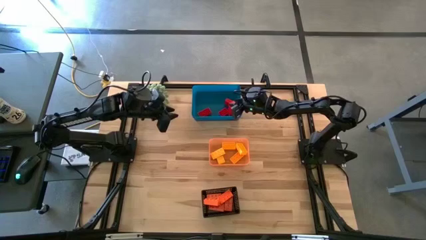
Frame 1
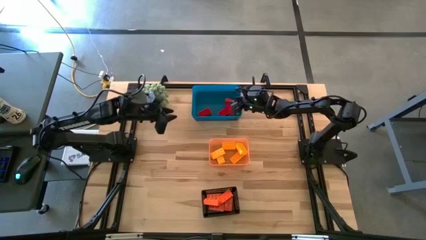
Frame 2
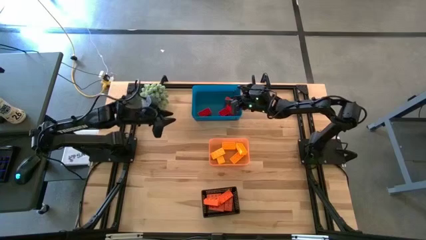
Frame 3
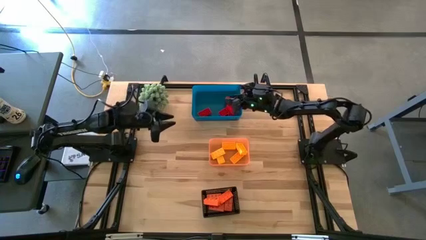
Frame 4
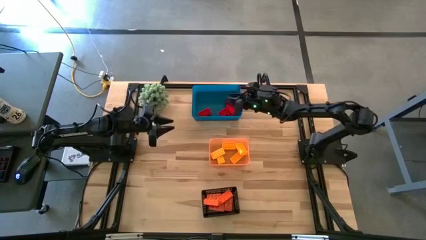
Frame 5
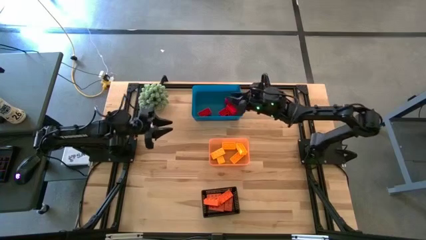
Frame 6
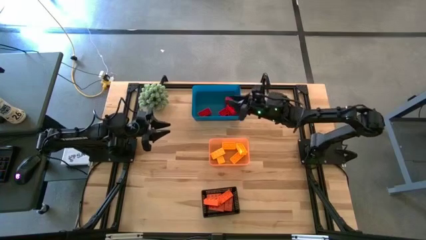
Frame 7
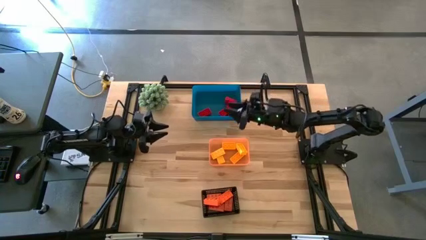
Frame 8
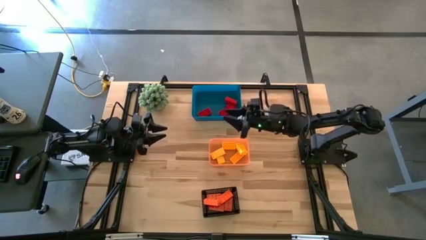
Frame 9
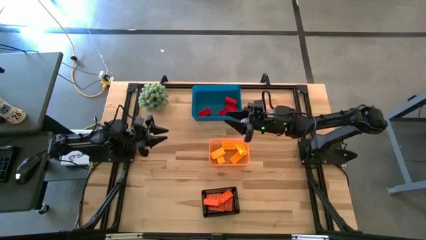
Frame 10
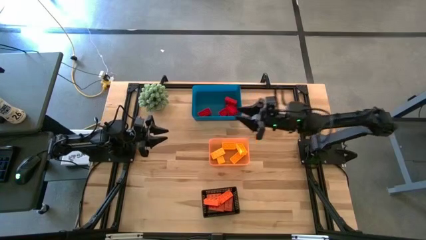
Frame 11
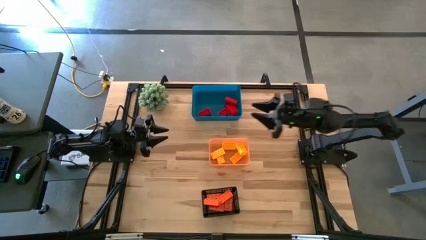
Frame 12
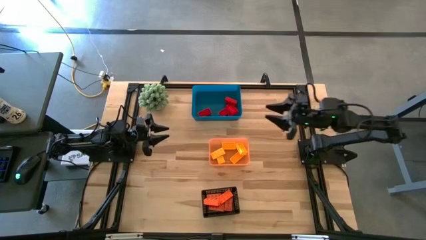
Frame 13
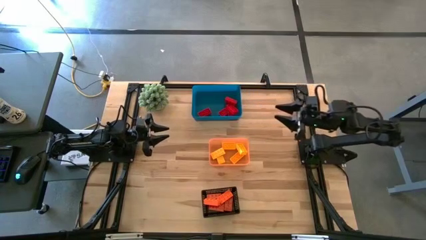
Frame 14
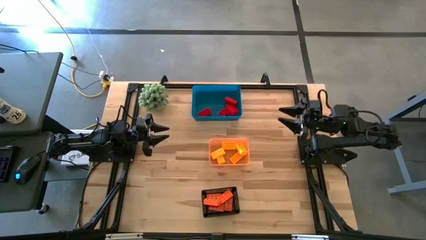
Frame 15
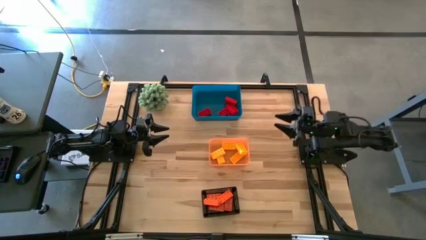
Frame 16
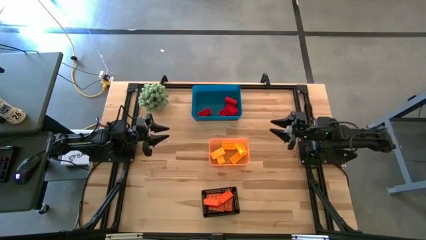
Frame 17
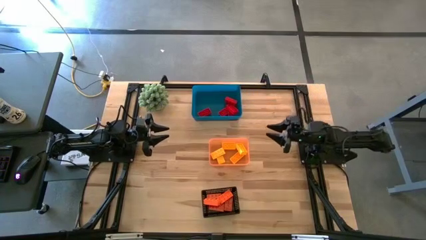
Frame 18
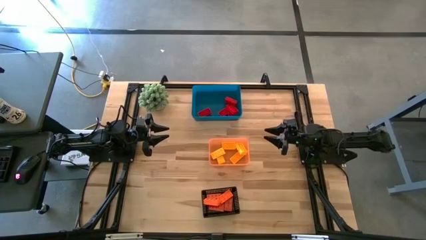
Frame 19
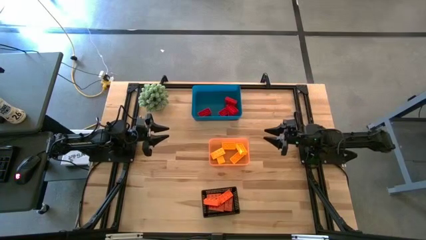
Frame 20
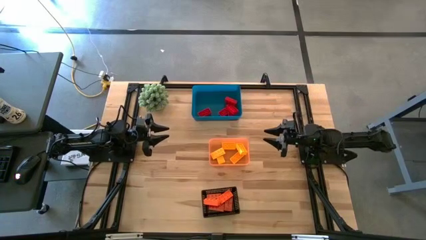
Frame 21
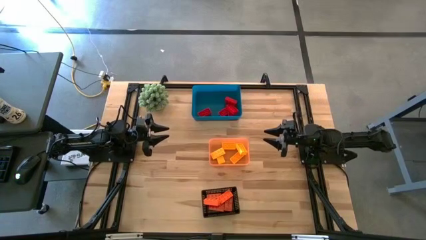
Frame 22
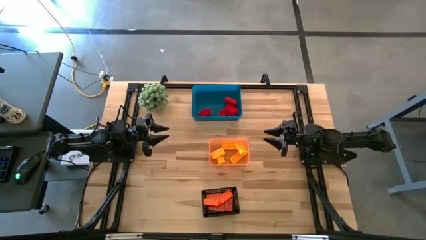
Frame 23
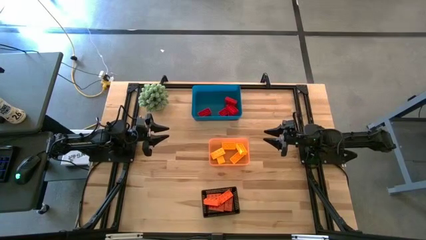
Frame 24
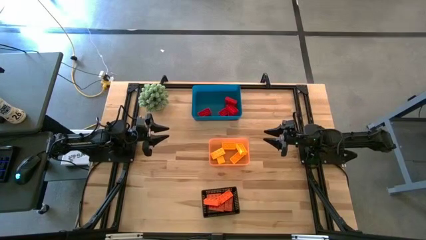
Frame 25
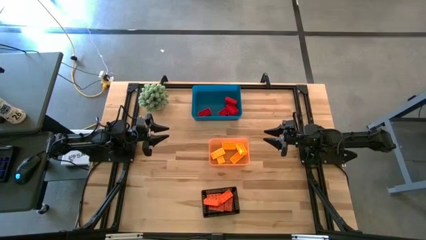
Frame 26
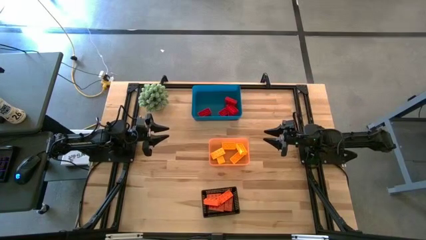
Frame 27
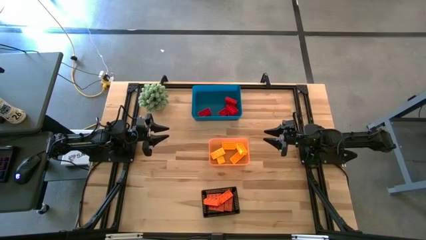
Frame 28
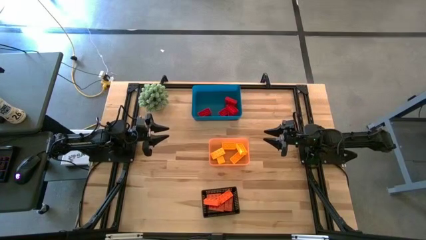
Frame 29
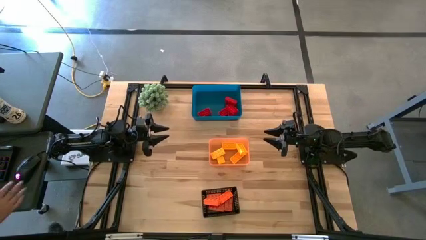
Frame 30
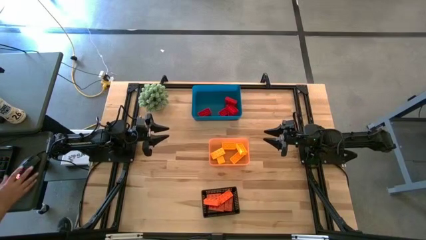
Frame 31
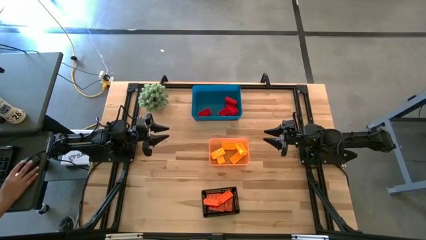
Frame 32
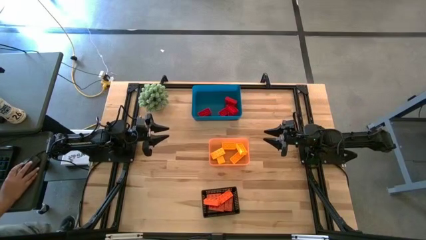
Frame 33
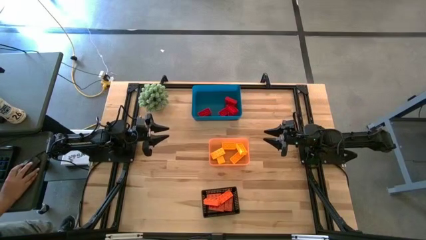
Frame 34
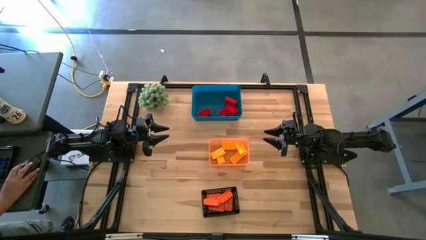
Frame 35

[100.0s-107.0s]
Task: Sort & place blocks by color
Return to Home Position

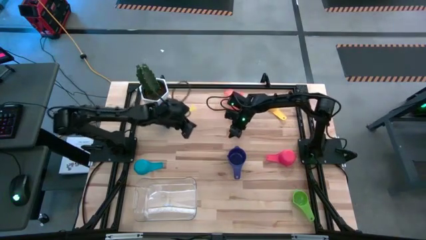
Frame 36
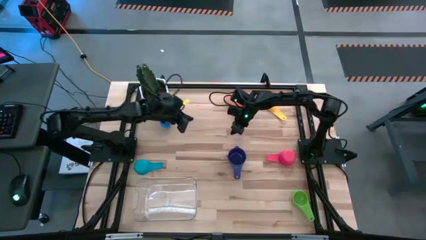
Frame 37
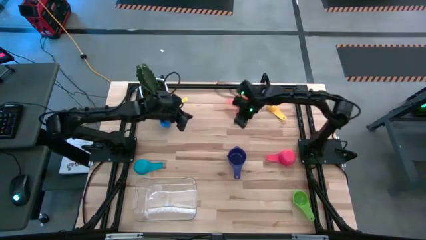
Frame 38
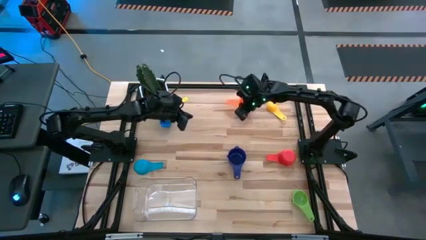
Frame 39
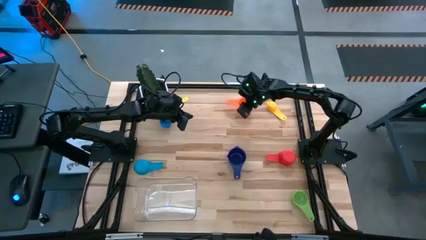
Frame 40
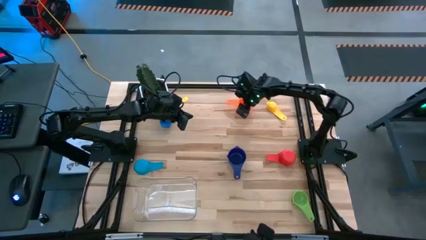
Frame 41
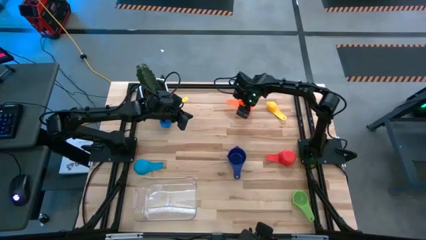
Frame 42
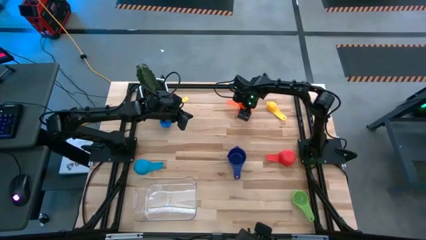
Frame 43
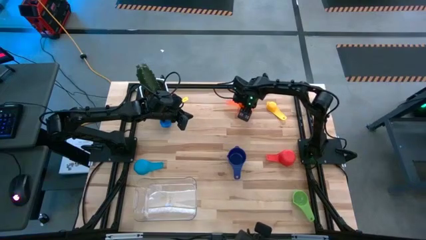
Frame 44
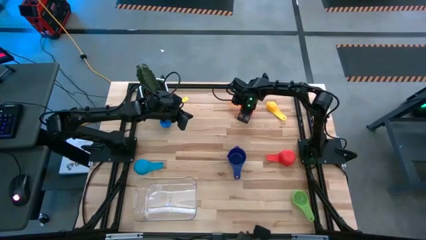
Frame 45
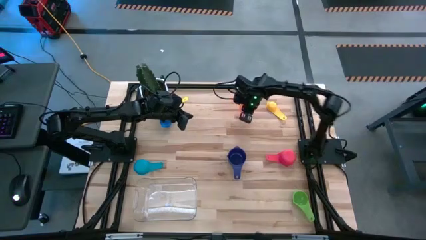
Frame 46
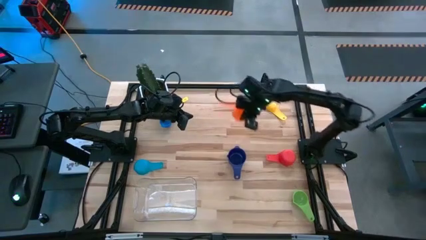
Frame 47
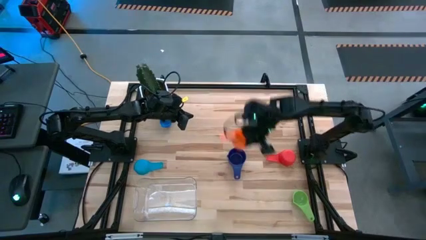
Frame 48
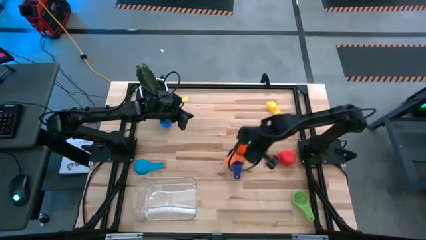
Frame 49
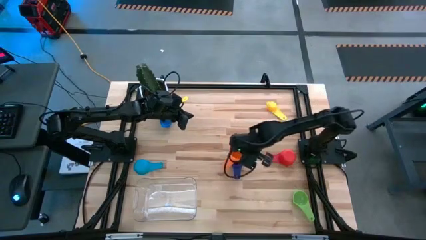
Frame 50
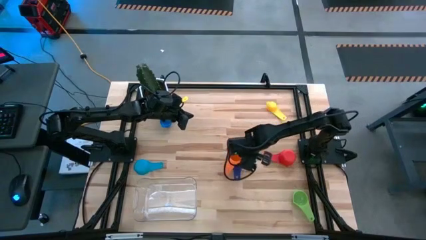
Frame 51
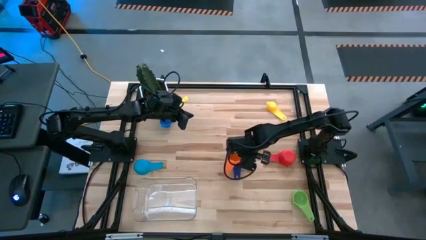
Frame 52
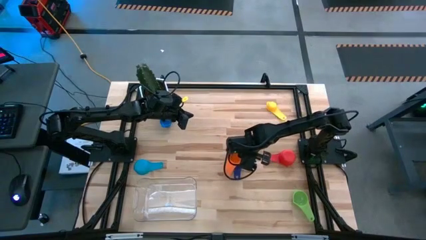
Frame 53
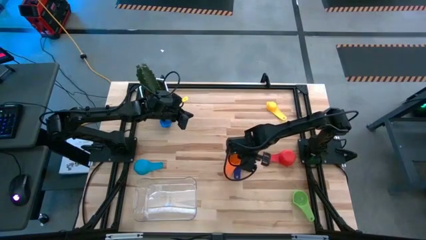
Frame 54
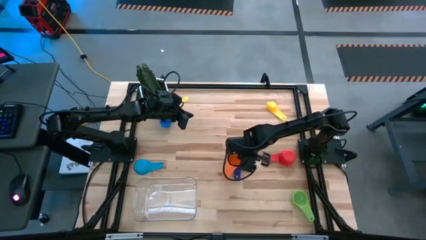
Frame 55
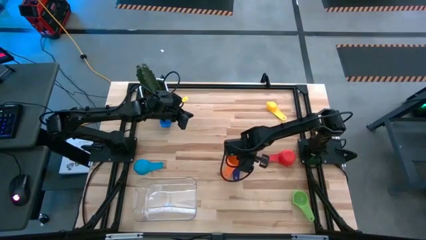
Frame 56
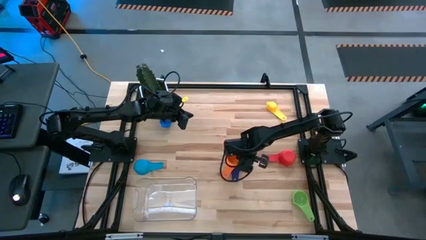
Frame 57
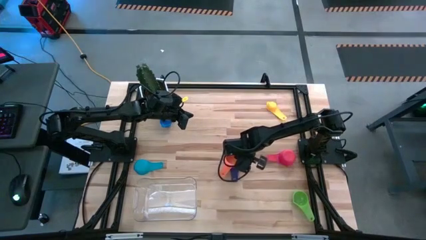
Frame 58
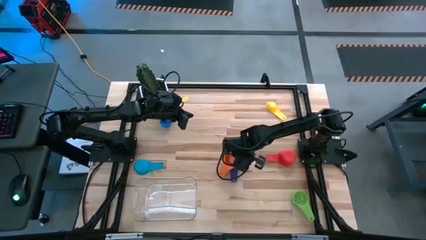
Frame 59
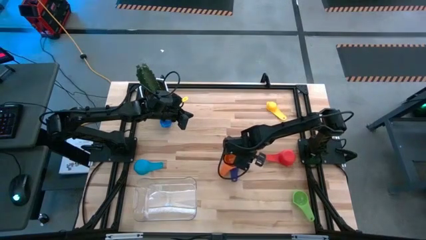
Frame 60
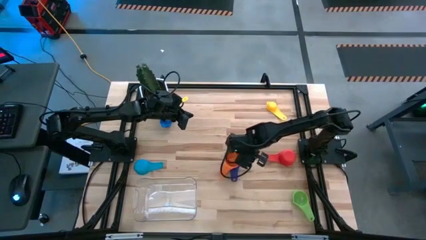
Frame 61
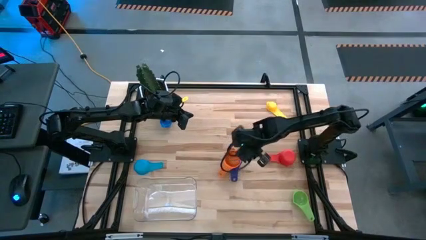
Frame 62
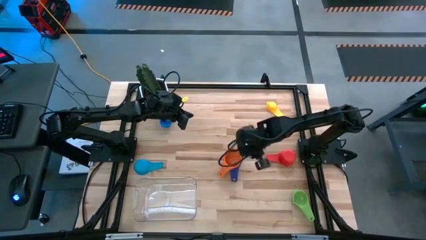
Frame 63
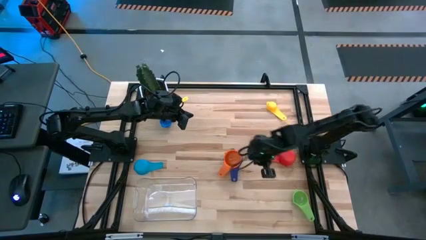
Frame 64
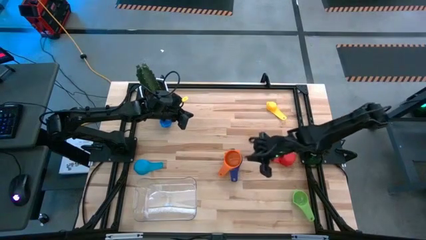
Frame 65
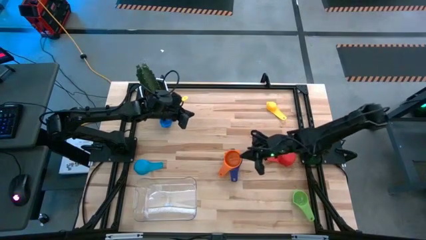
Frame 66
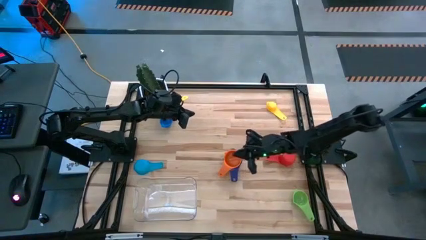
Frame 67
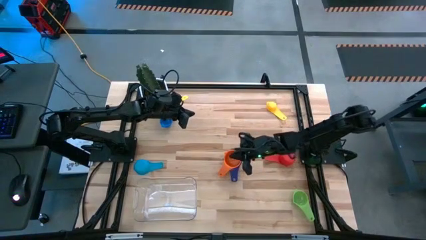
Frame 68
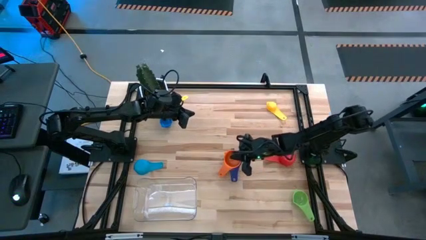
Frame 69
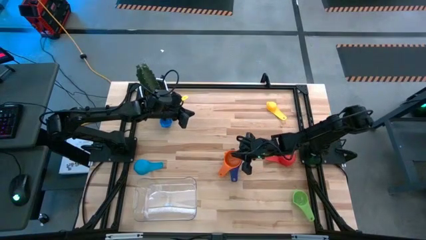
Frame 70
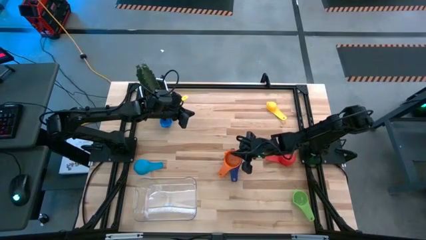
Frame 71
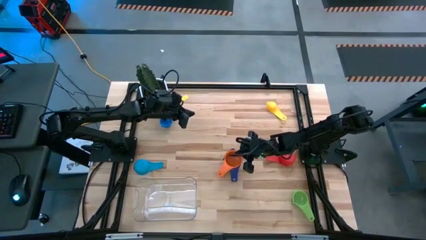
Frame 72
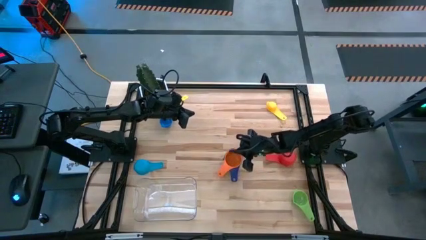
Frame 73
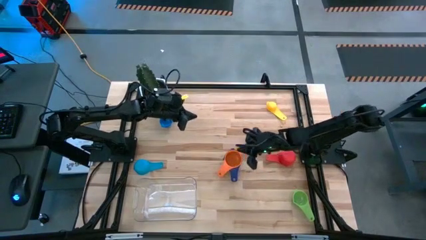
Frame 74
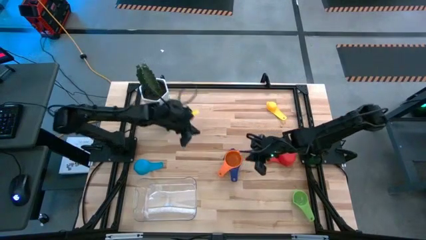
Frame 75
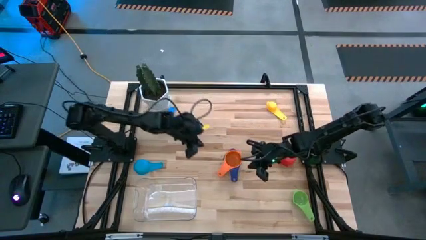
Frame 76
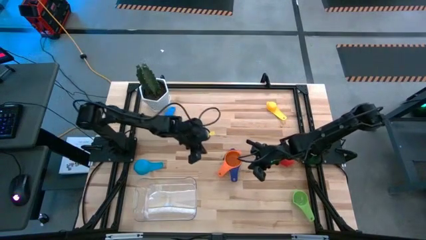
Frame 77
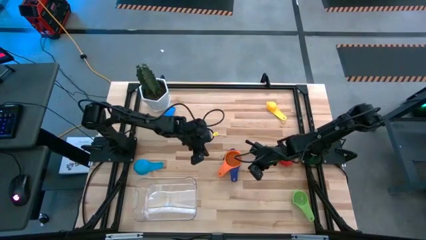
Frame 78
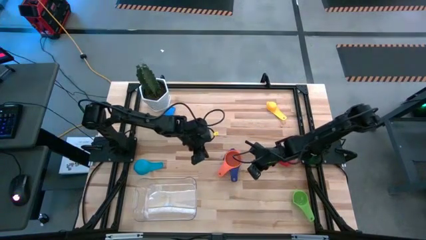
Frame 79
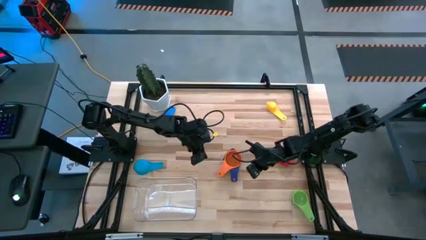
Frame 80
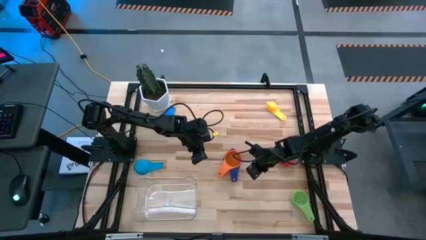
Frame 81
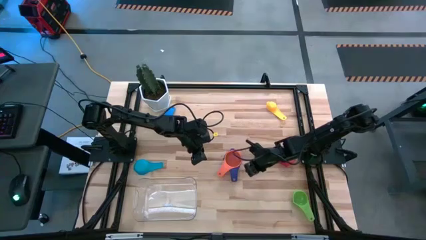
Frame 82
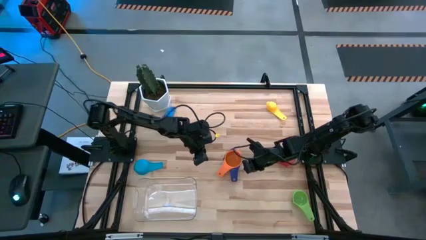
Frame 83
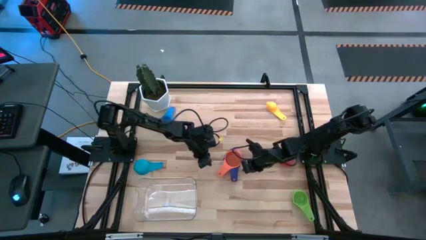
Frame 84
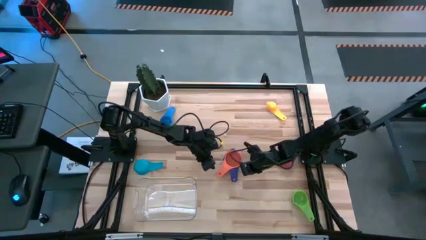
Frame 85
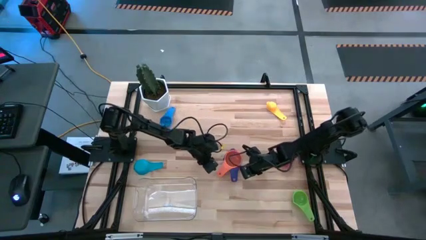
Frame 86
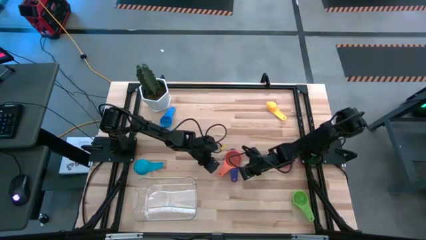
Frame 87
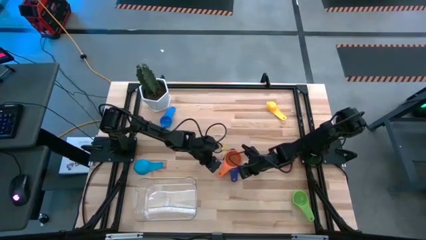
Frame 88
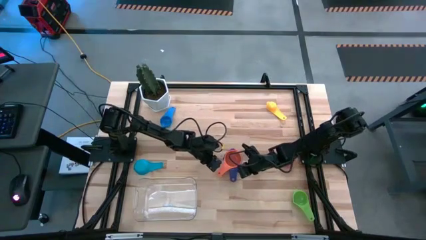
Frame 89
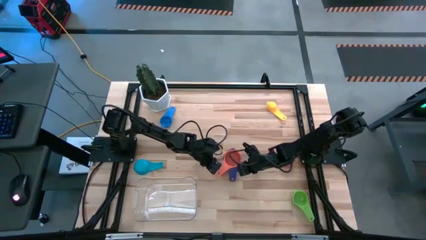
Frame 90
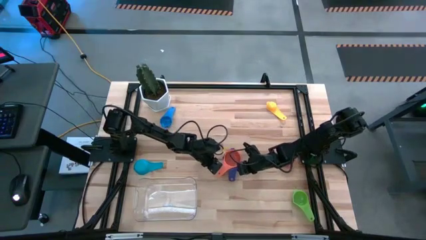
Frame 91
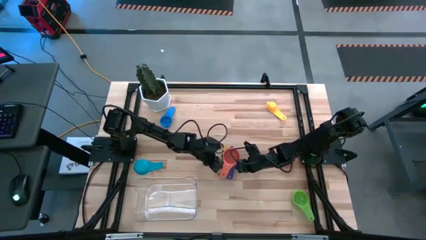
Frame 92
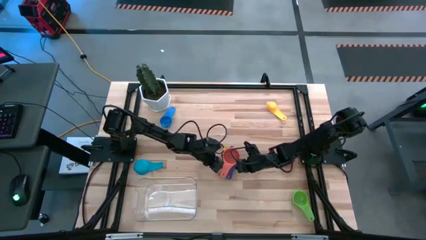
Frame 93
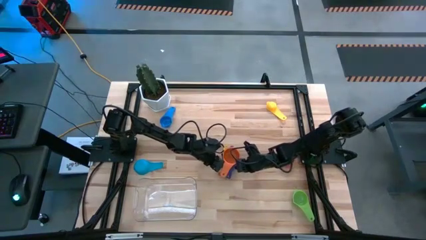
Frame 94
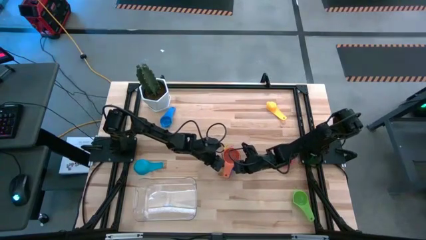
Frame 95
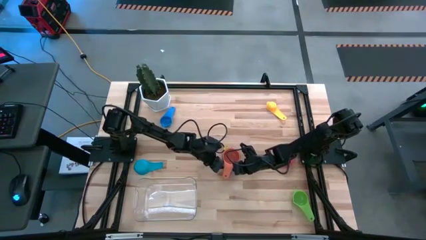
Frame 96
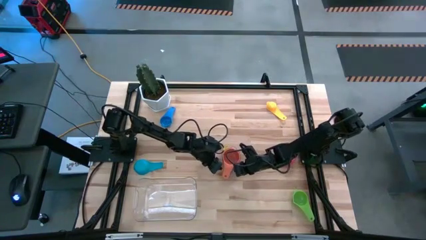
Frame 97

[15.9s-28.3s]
Task: Nest measuring cups in basket
Stack the orange measuring cup on top of the dark blue measuring cup
